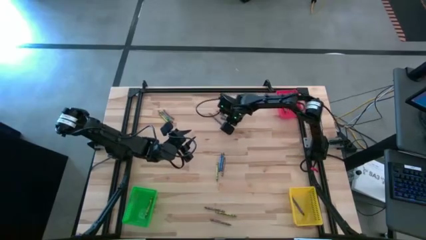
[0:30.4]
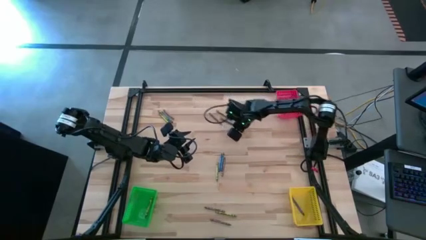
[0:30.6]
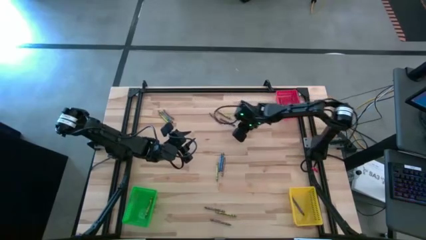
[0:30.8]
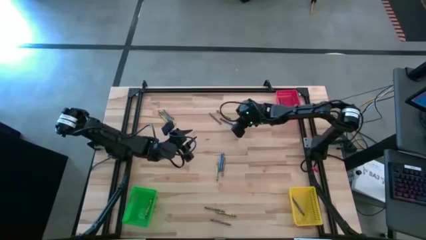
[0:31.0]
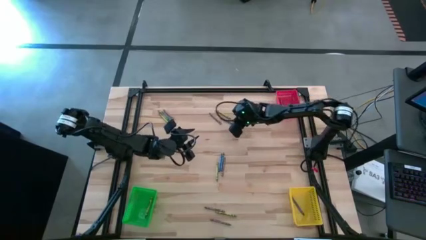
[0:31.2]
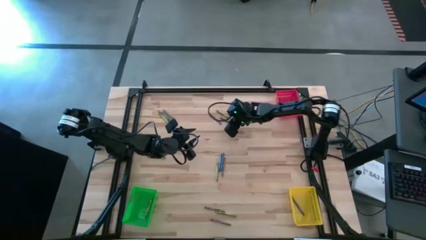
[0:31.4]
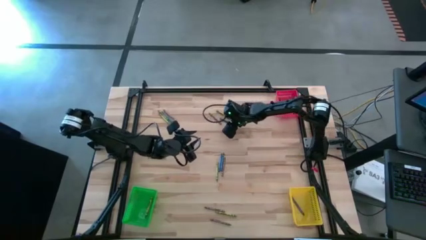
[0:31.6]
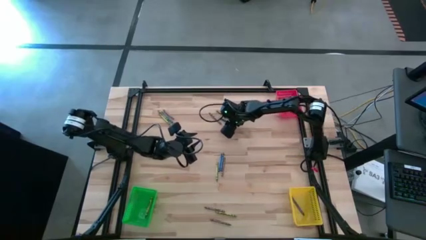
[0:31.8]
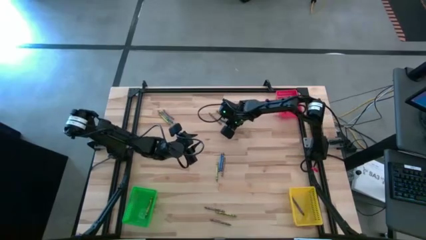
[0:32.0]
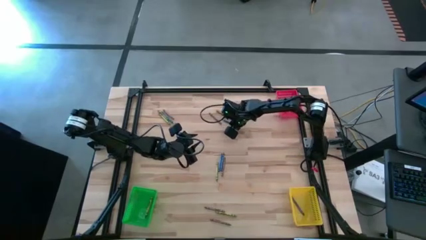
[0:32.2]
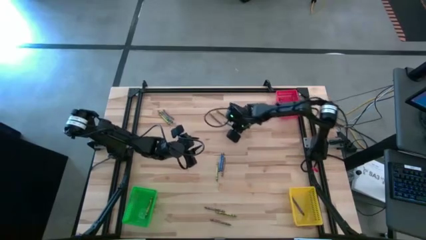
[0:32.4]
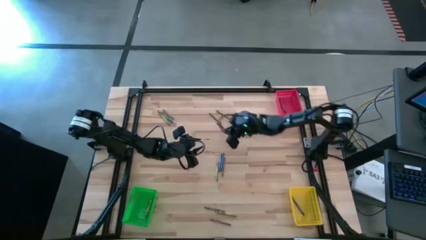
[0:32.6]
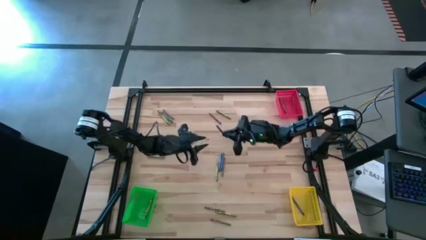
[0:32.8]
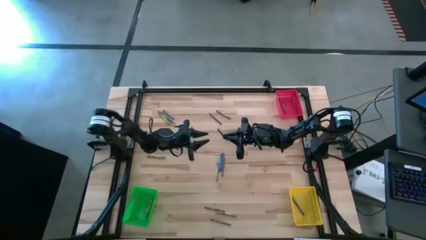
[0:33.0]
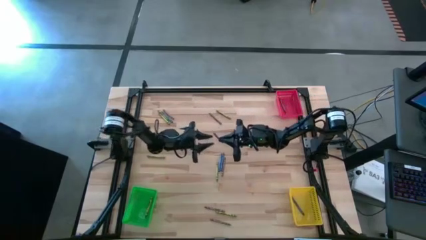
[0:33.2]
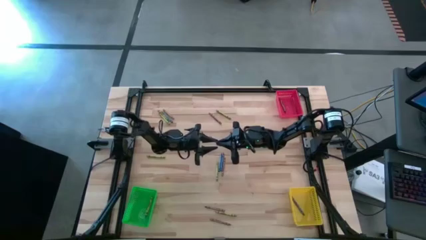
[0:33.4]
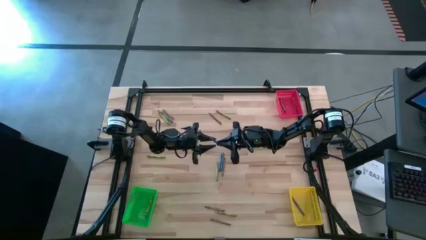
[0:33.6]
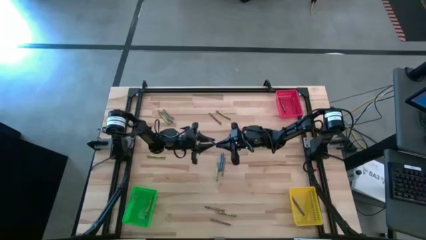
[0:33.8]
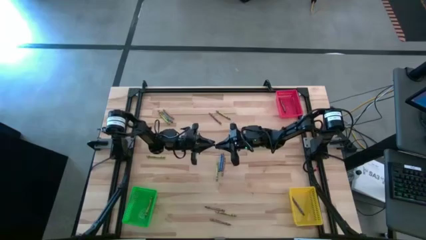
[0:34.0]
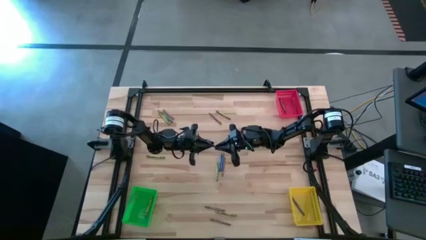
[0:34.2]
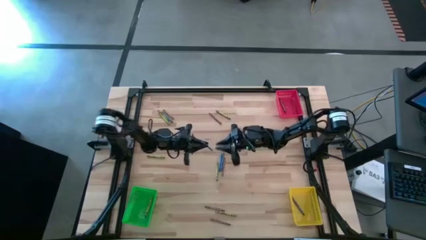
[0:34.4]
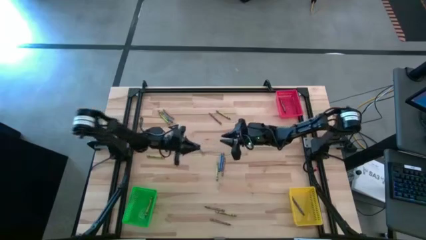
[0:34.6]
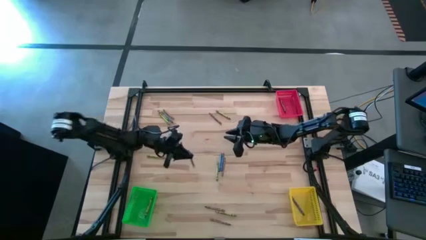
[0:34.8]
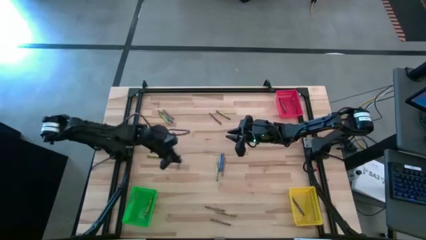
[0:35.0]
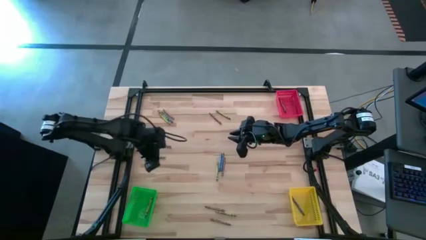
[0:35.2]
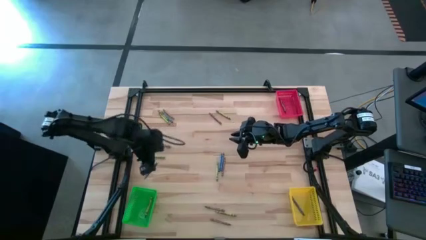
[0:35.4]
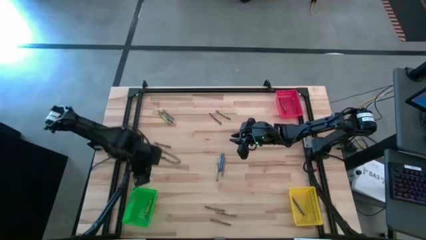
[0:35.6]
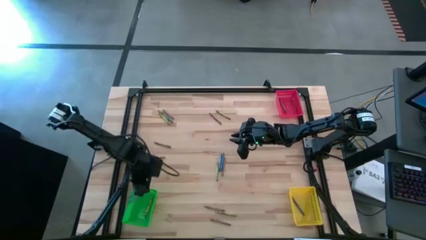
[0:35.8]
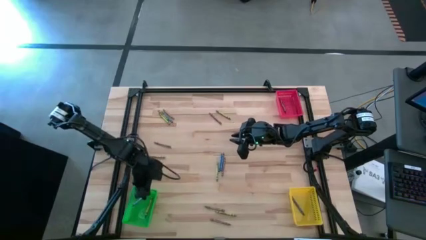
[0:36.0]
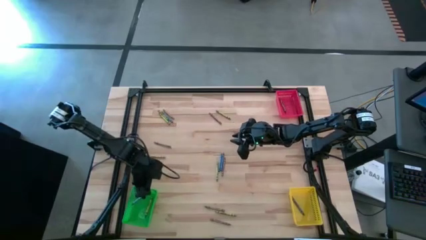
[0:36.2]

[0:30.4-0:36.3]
Task: Sort crayons
Put the blue crayon into the green bin

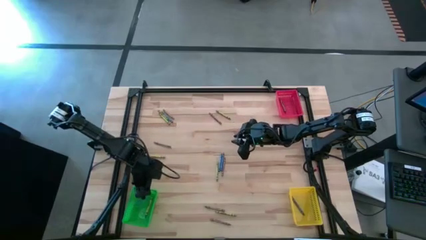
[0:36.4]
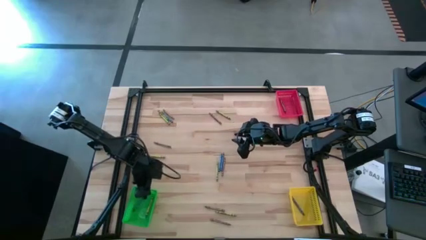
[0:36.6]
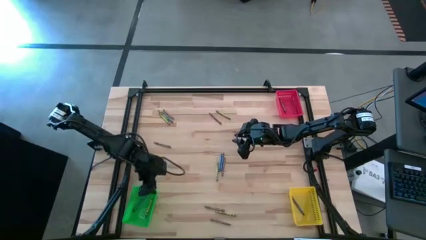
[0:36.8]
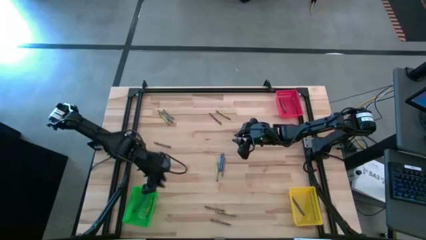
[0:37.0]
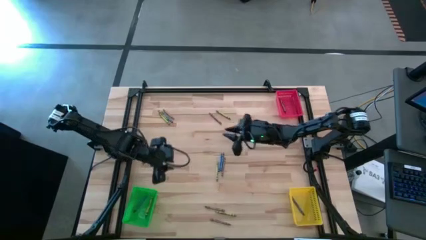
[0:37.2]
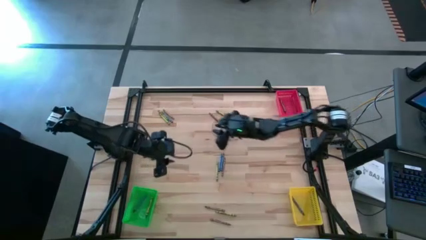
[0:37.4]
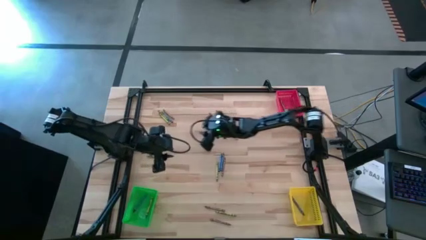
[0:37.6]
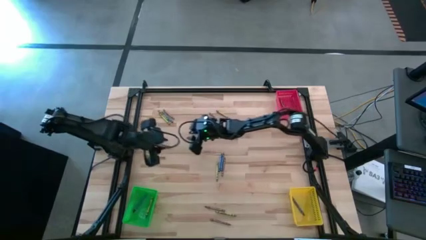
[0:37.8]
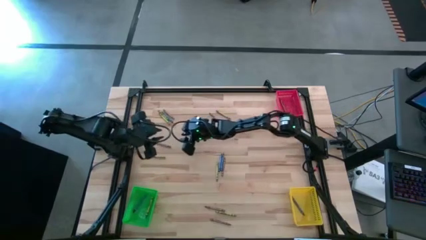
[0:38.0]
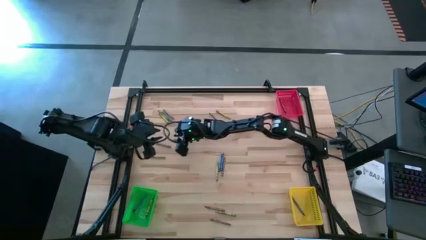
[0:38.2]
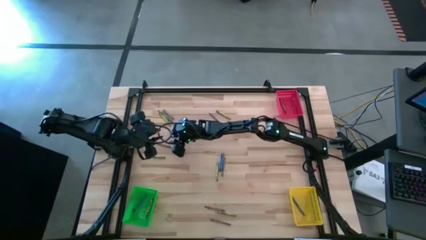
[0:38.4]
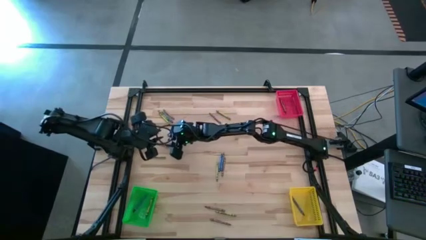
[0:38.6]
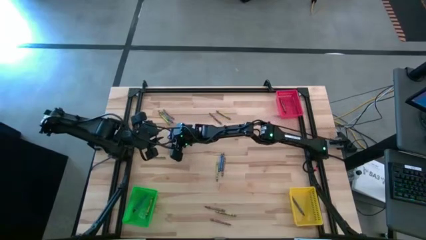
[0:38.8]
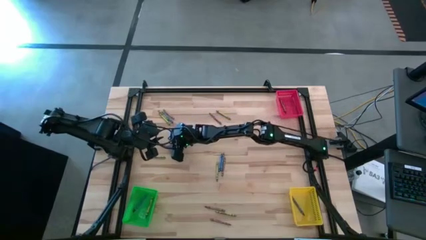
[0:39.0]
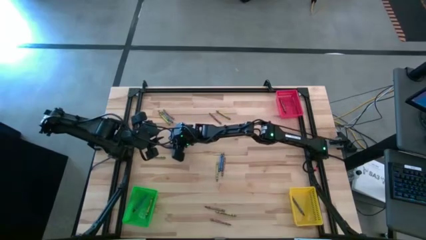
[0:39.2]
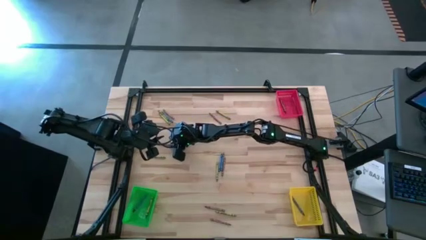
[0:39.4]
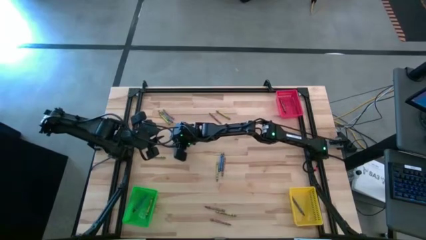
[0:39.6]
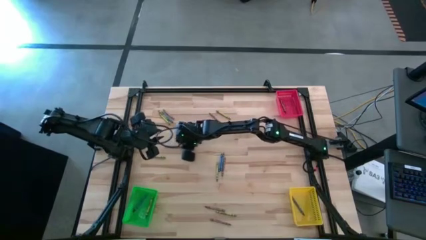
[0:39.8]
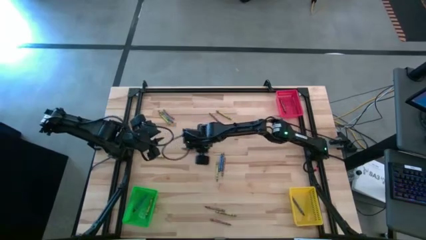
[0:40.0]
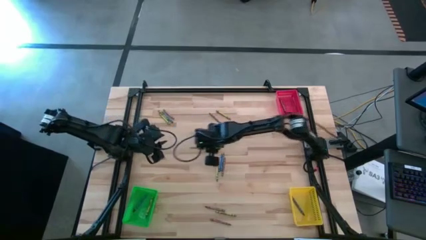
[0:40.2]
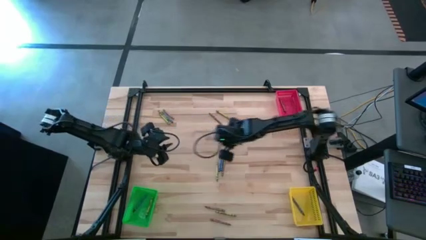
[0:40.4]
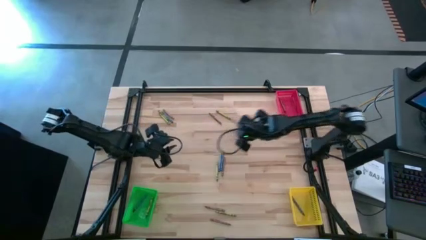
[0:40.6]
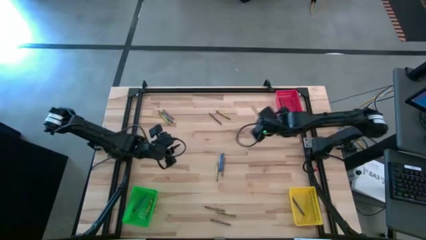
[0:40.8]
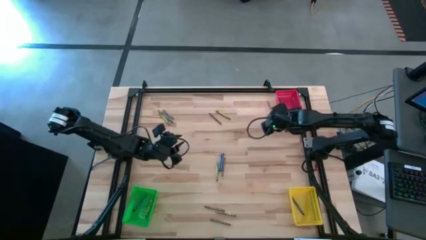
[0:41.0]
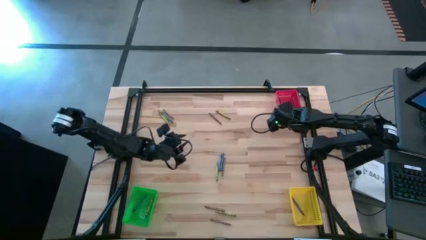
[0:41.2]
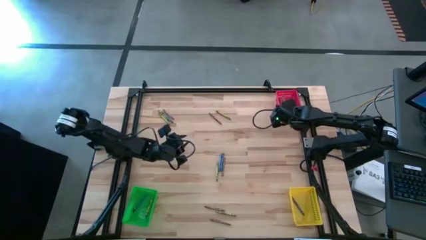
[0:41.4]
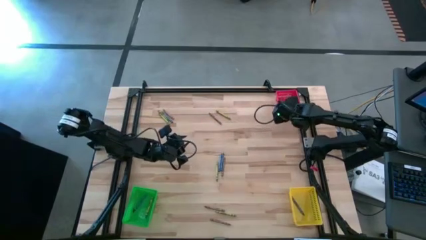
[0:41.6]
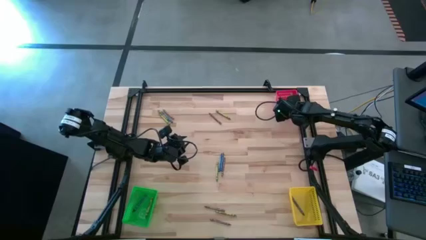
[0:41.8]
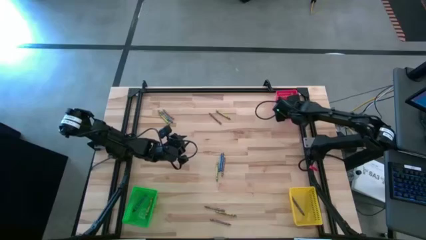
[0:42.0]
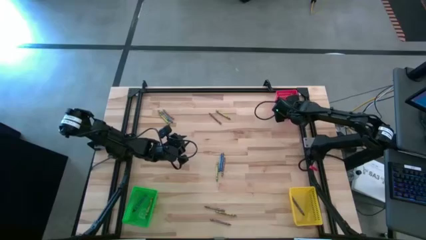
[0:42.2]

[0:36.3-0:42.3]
Put the brown crayon into the red bin

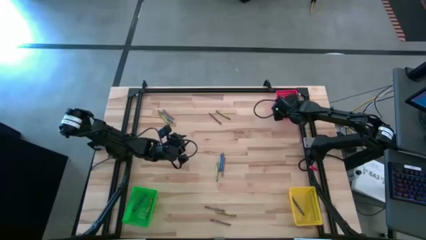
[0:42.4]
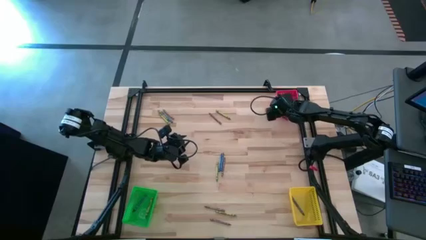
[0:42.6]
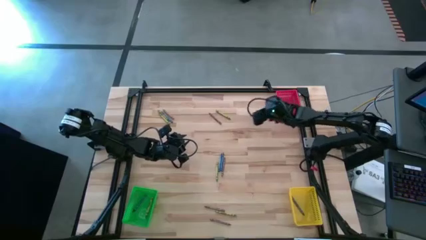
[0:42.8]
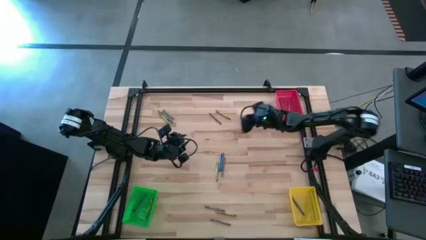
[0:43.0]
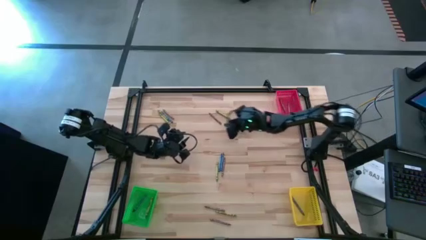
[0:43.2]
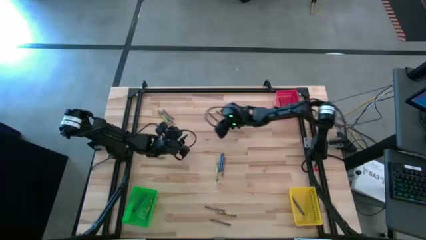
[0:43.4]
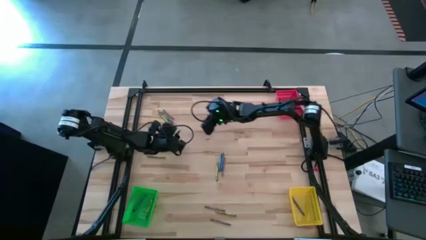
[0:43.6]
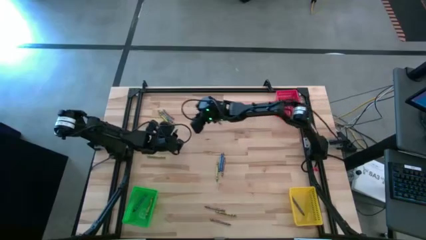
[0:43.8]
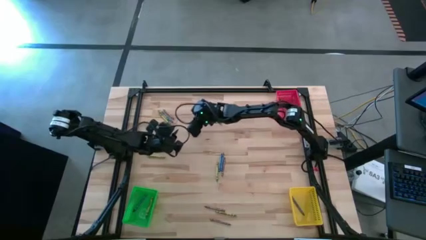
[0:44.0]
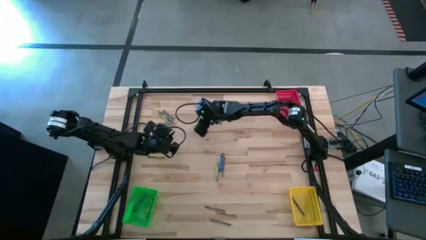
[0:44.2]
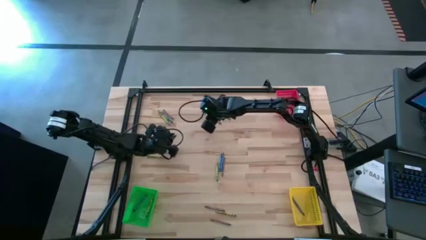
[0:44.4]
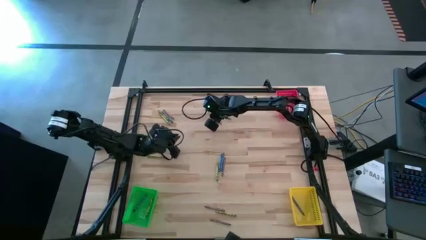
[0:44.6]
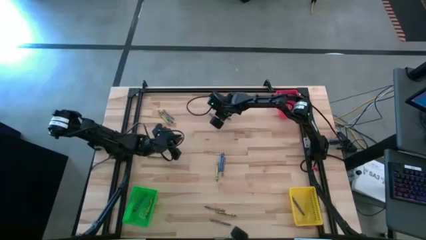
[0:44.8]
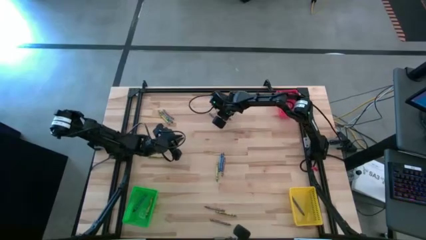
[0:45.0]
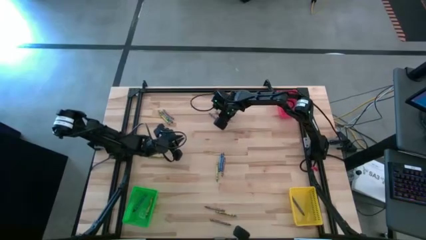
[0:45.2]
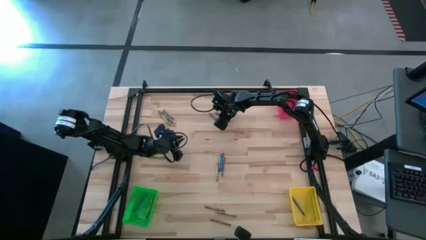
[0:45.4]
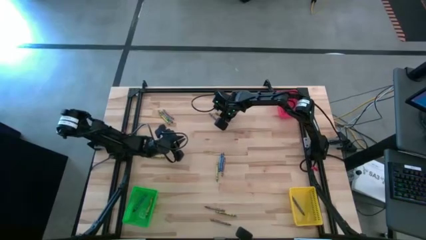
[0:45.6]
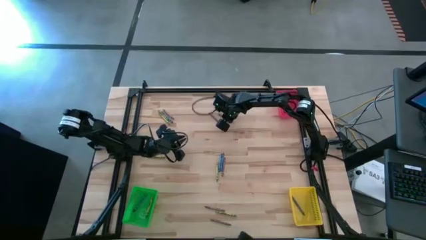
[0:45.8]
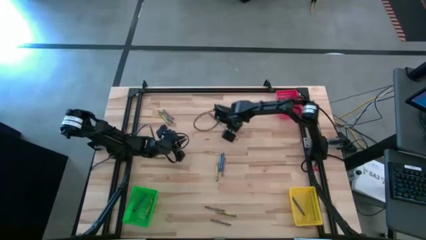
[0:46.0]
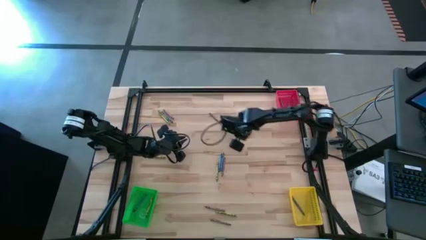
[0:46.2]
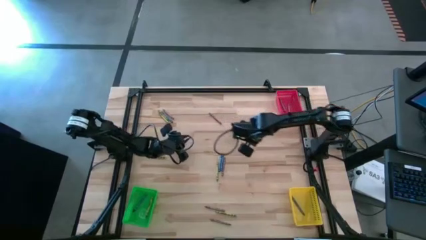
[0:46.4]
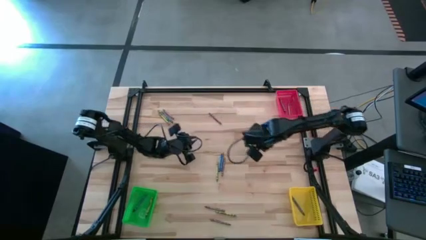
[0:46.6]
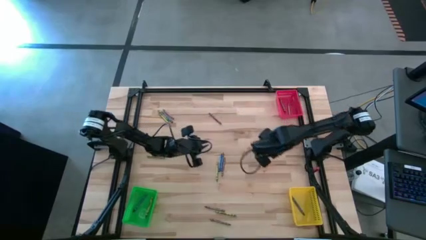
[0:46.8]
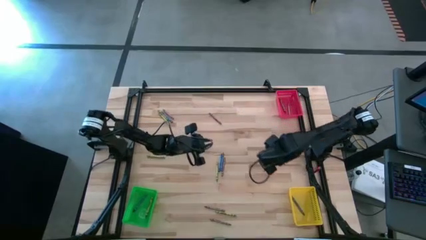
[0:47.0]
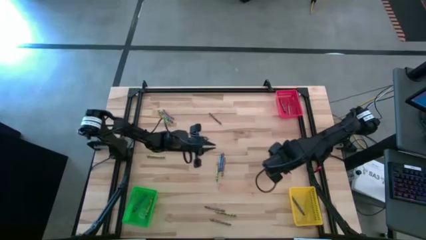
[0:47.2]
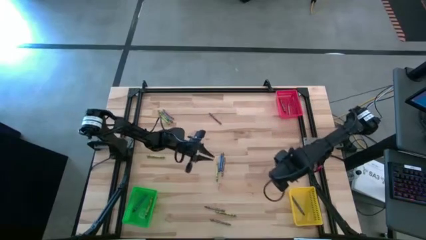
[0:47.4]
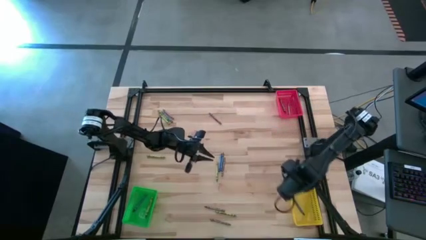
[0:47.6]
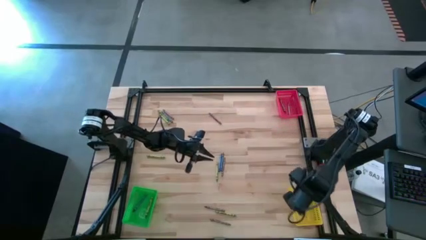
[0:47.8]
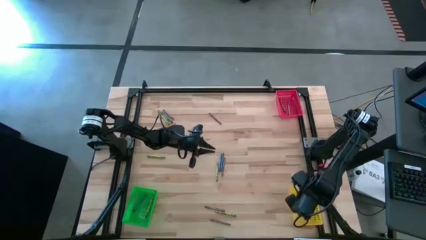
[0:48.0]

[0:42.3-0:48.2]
Put the green crayon into the yellow bin
